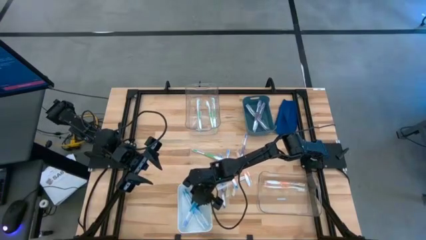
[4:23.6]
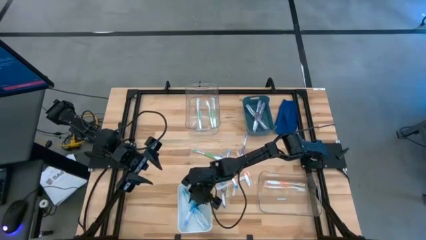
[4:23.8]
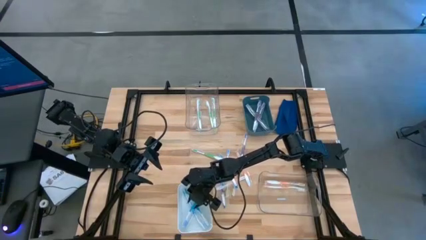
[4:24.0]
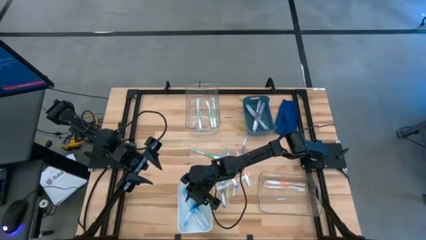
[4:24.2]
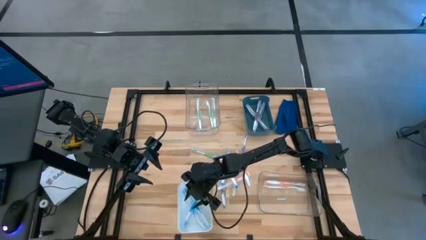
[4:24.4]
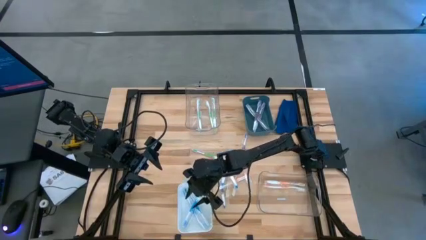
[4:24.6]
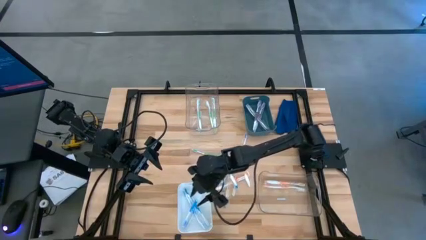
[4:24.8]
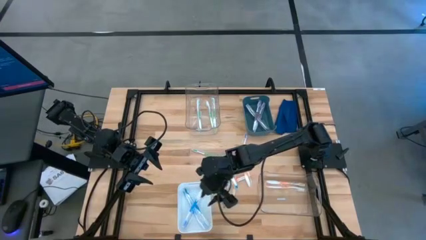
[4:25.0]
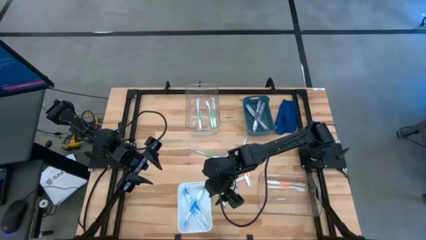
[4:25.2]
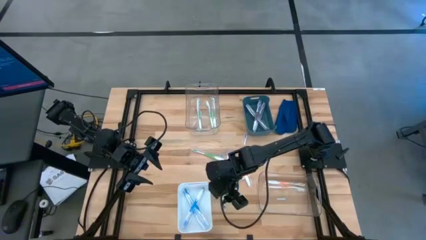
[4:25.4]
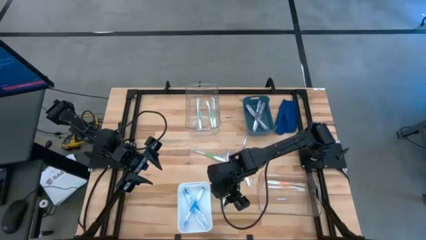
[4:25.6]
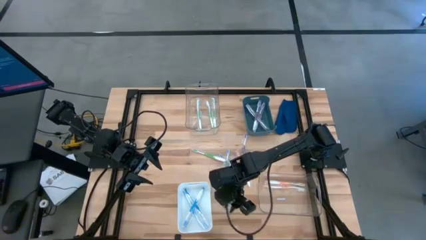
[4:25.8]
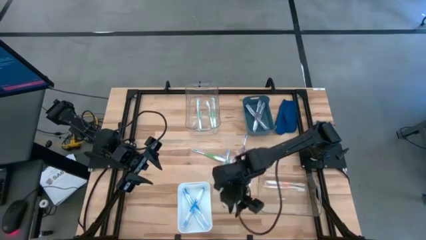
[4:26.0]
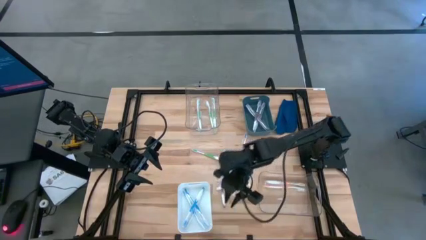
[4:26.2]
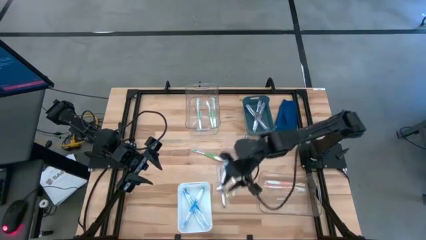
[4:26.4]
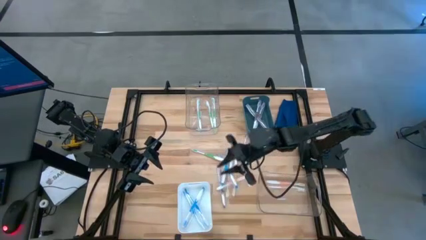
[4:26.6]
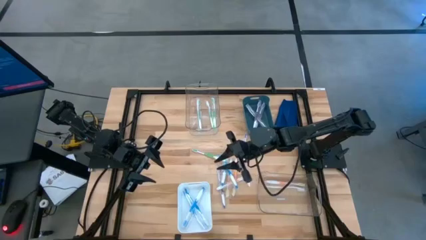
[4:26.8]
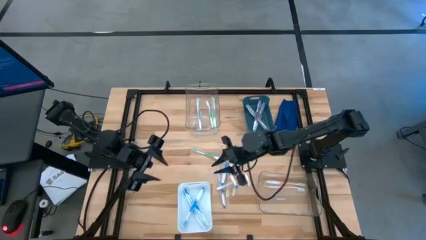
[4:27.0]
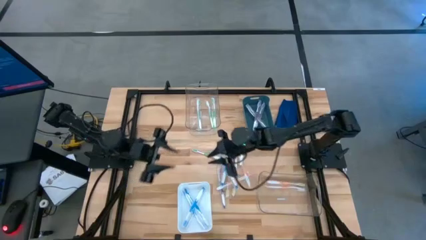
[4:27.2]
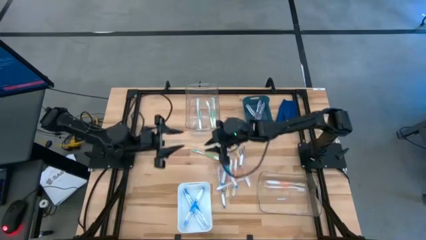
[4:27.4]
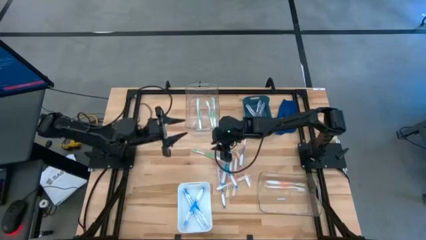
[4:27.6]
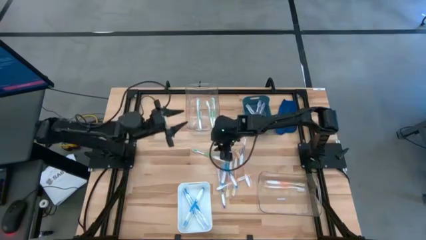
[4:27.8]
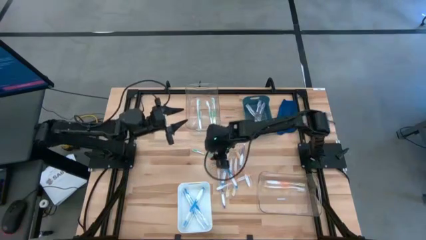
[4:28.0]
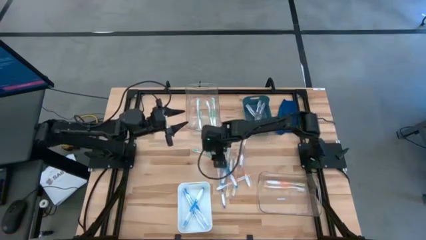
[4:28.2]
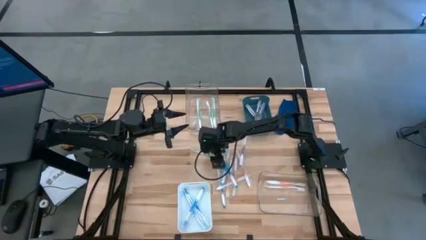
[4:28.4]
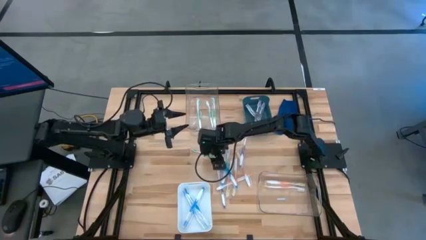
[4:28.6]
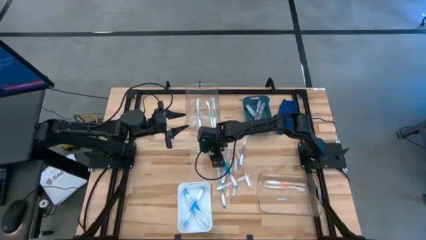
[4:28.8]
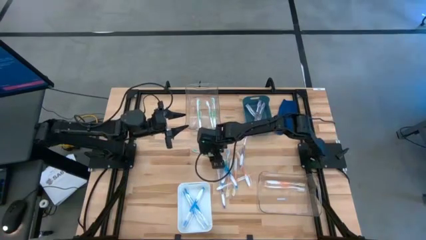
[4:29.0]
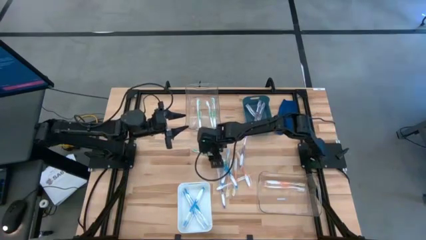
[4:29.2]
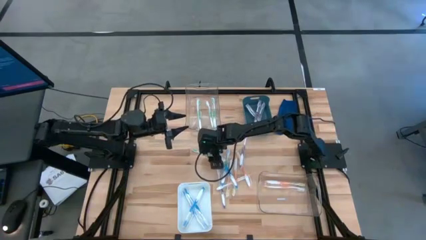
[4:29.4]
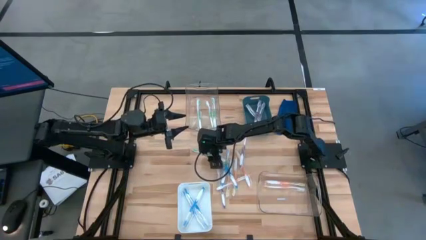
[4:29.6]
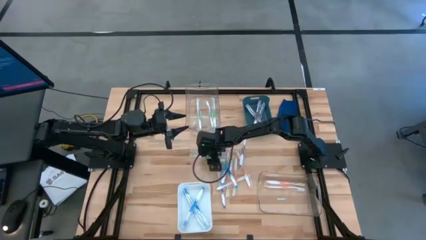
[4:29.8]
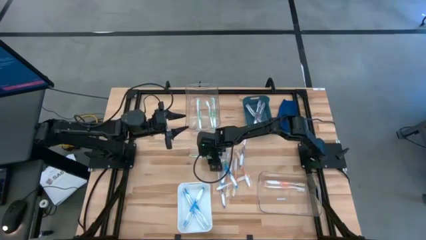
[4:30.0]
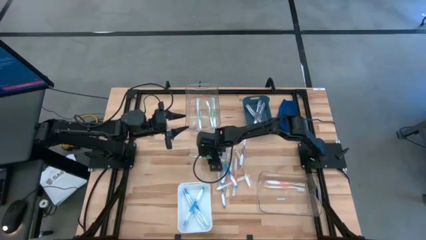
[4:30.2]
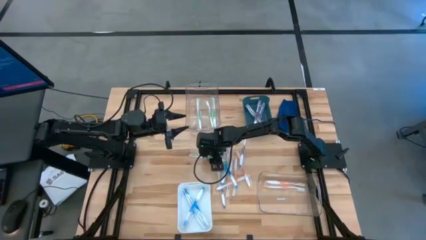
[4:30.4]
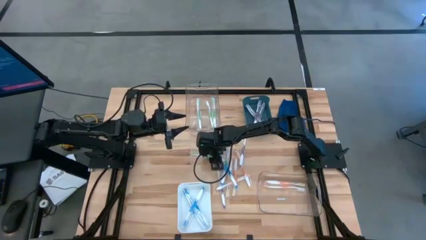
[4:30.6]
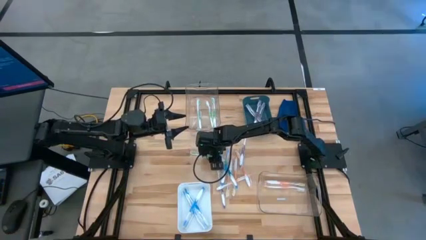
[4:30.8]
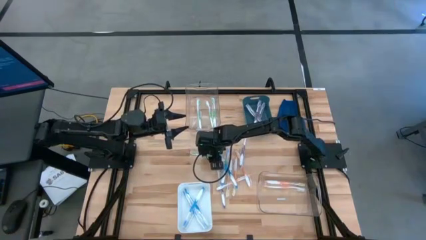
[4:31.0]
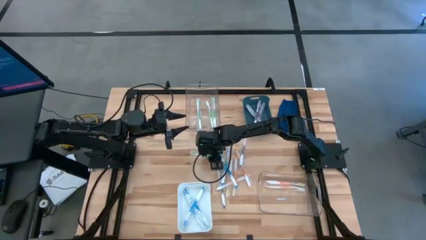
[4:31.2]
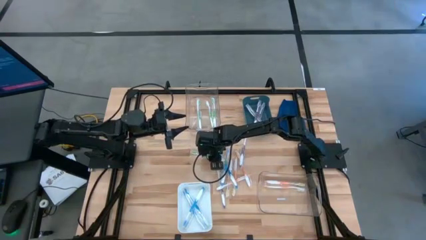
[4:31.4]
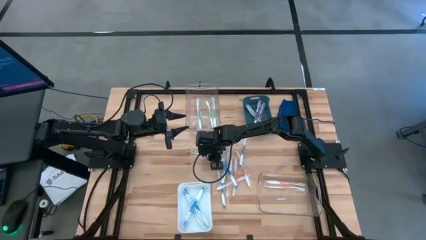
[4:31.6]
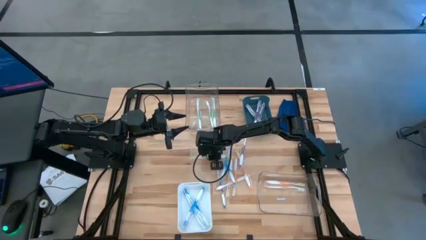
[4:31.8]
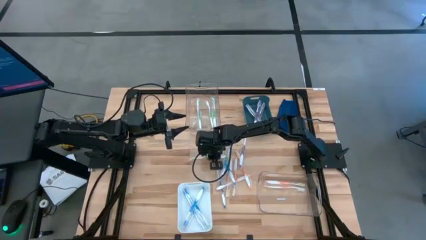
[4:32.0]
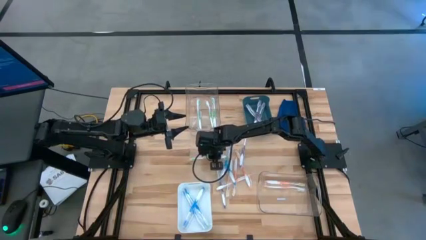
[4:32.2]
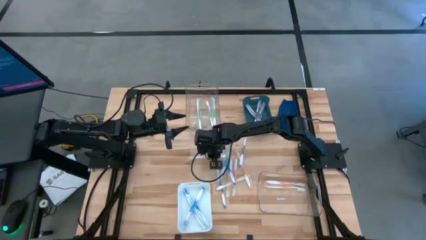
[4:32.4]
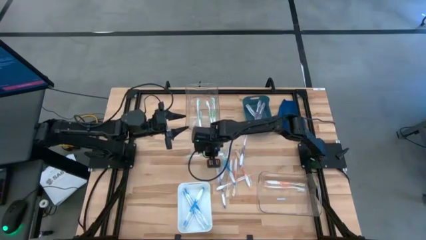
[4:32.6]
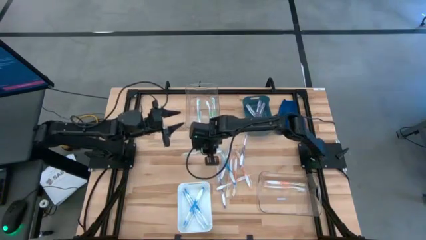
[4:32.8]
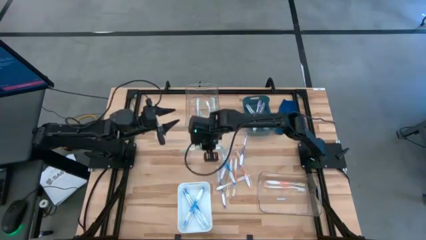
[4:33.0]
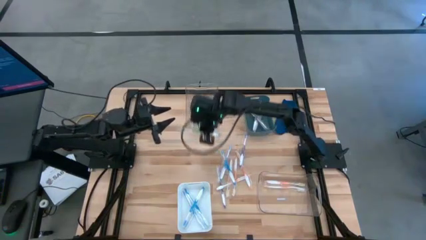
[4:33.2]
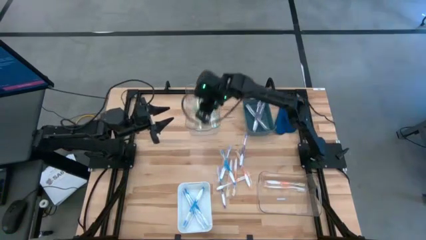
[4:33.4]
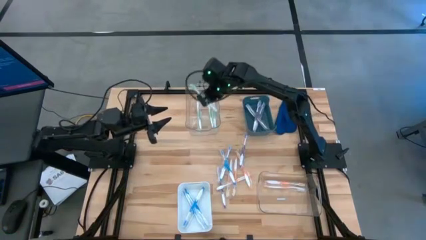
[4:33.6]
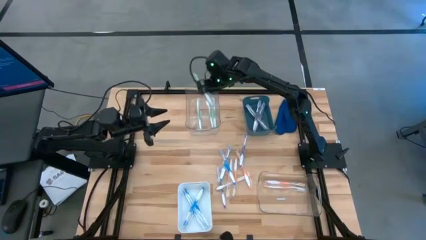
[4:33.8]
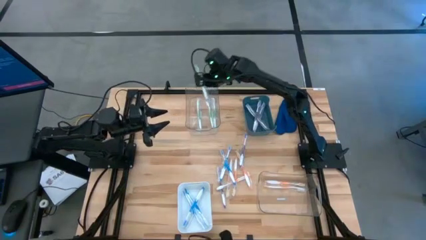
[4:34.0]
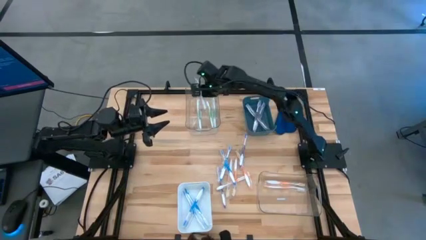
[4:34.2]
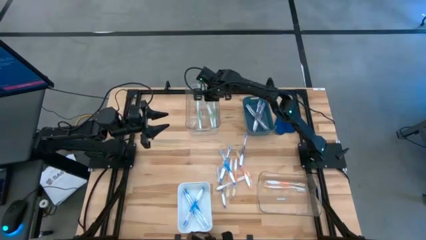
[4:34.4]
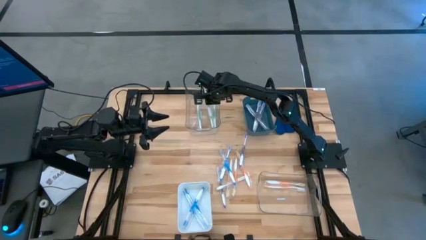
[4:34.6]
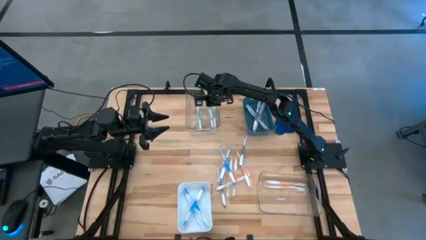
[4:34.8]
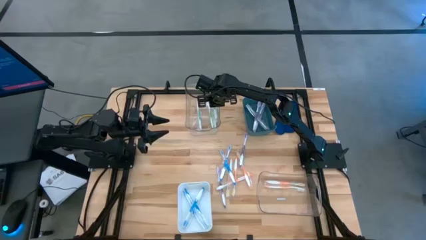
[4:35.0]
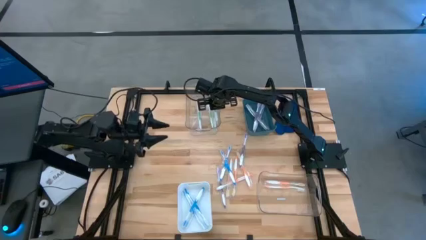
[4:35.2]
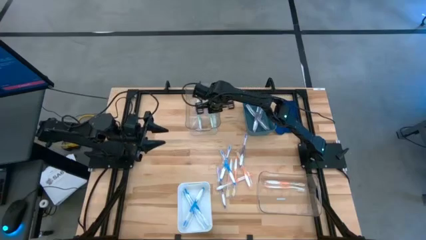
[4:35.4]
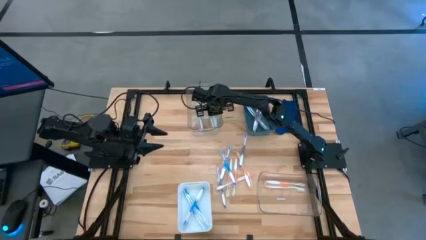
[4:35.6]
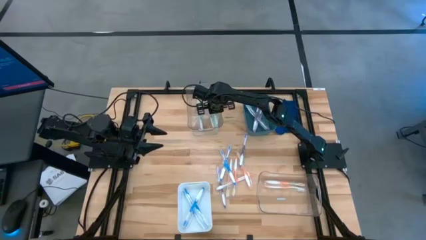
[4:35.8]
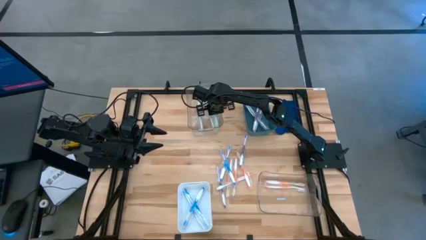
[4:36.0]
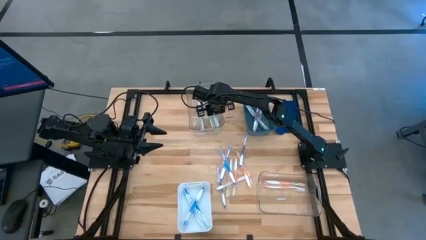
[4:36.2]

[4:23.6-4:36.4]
Task: Pick & Place Toothbrushes
Put the green toothbrush into the top transparent bin

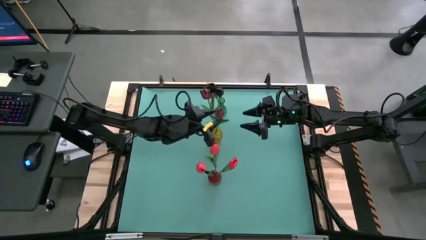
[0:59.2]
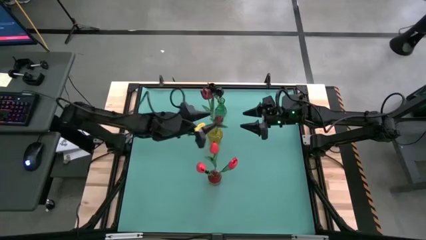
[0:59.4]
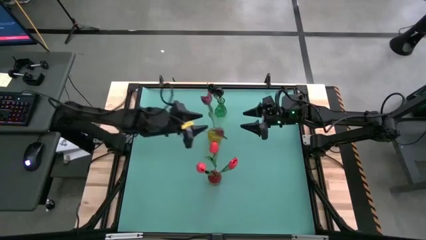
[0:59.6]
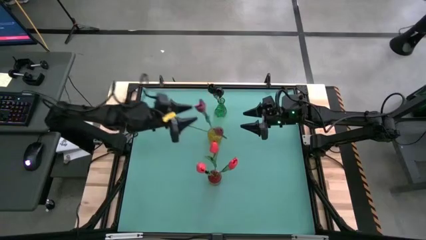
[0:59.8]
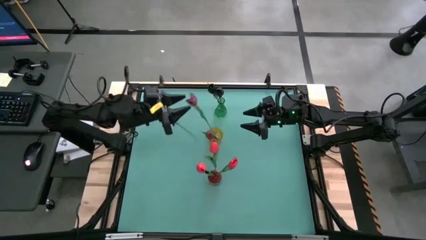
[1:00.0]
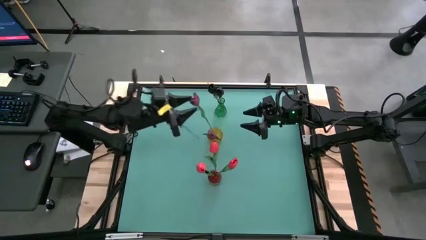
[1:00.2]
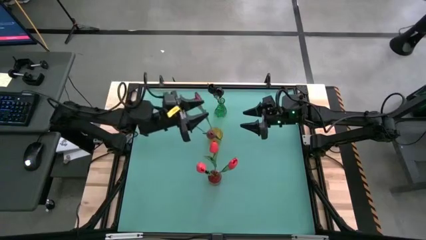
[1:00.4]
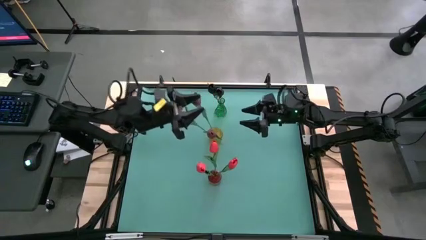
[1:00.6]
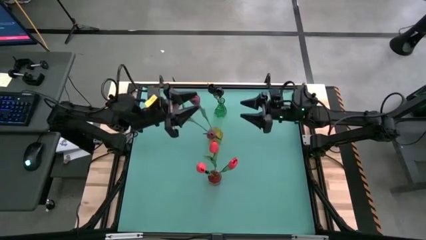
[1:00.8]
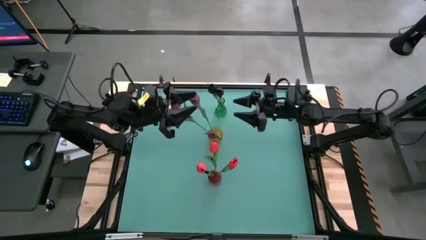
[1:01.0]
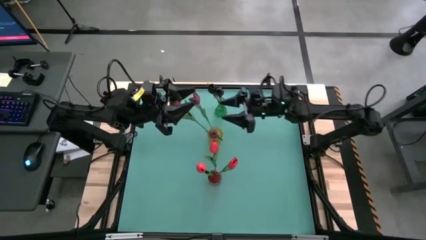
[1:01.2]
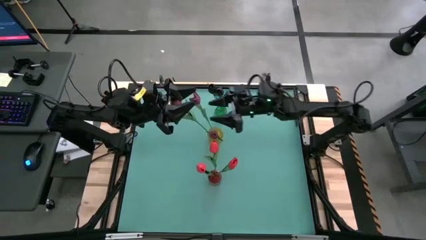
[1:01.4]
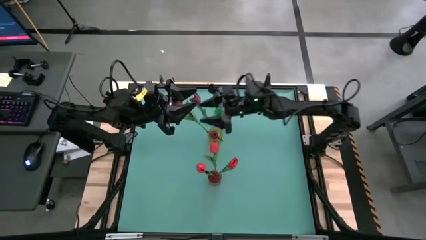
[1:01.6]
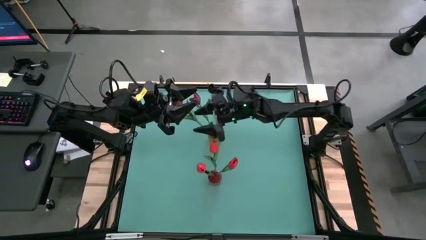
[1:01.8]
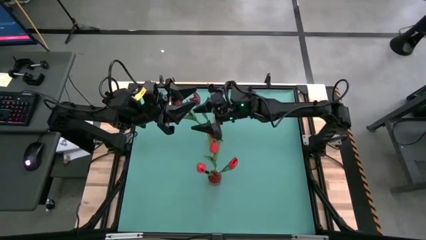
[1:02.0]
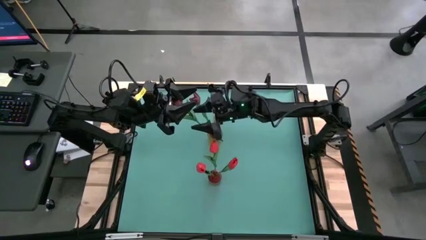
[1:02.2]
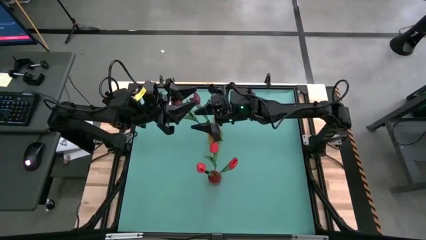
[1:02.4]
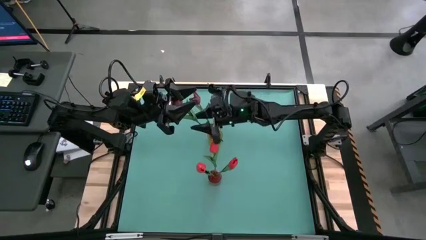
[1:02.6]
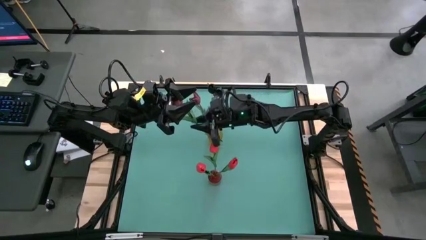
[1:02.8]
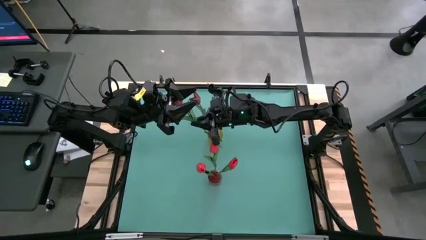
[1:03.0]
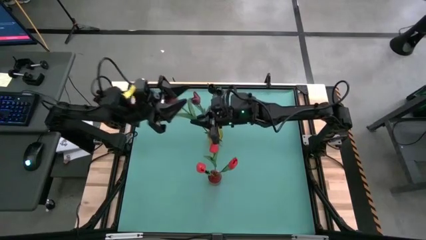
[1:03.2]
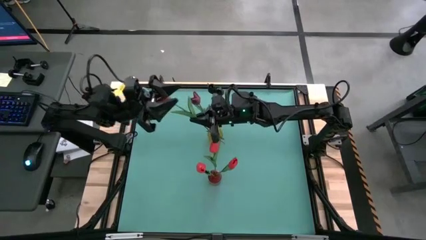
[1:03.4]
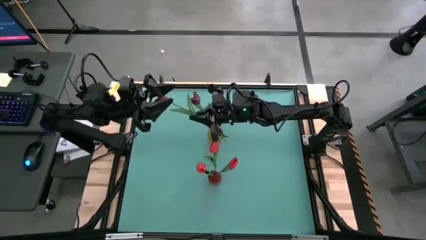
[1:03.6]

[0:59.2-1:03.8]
Task: Sort flowers into vase by color
Put the red flower into the yellow flower vase
